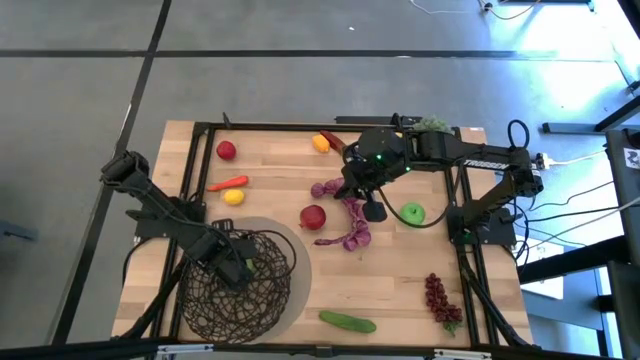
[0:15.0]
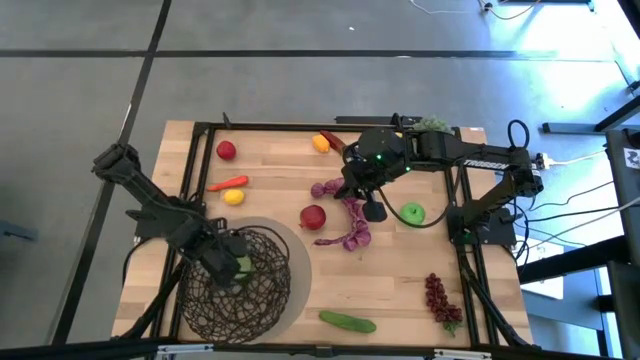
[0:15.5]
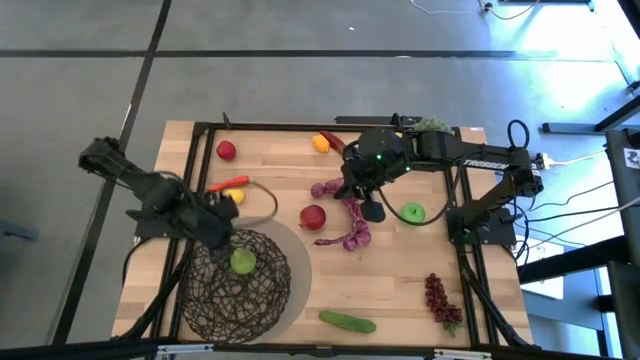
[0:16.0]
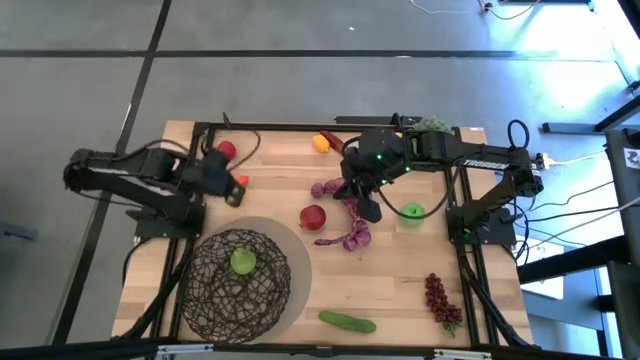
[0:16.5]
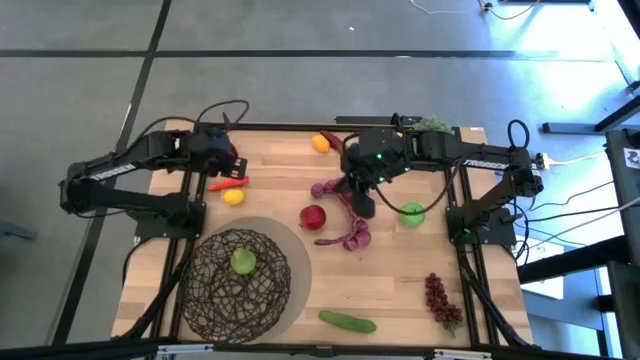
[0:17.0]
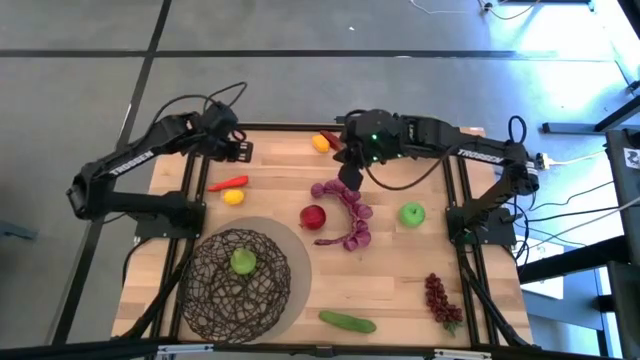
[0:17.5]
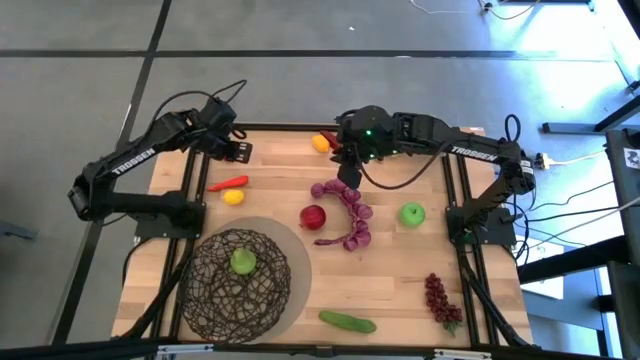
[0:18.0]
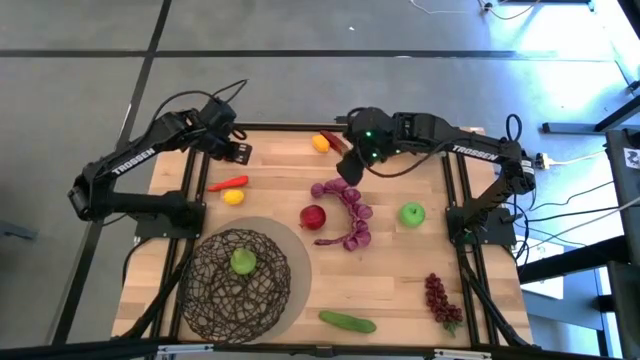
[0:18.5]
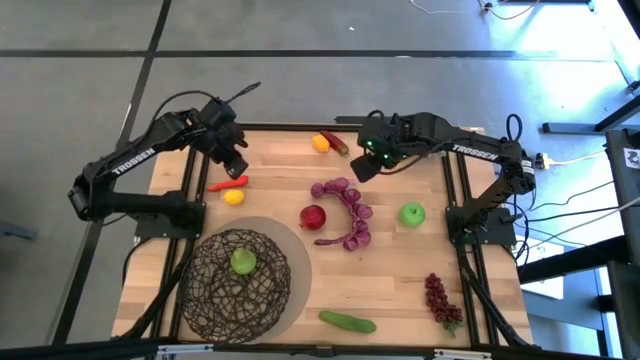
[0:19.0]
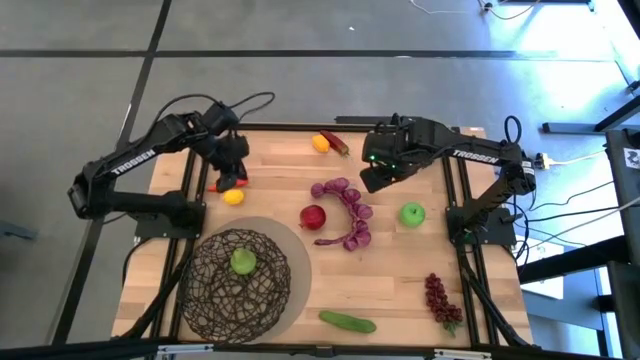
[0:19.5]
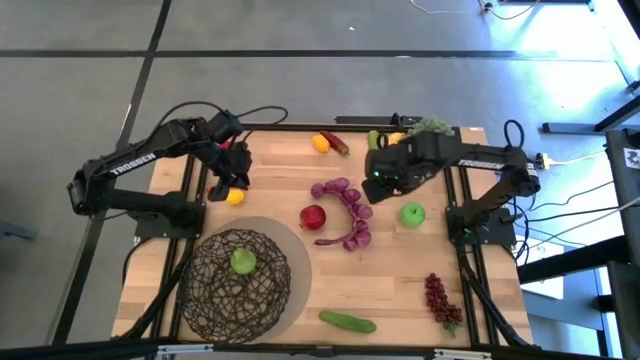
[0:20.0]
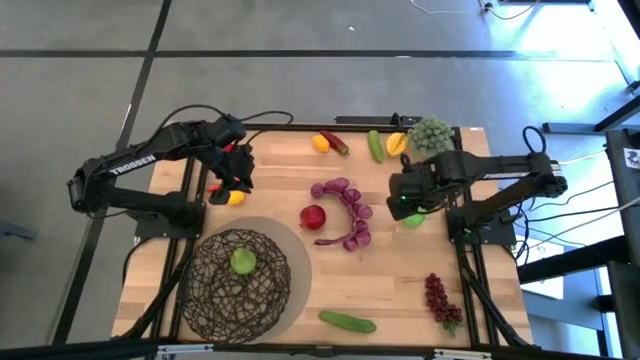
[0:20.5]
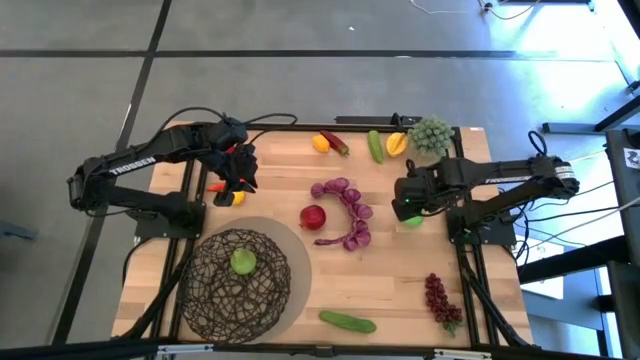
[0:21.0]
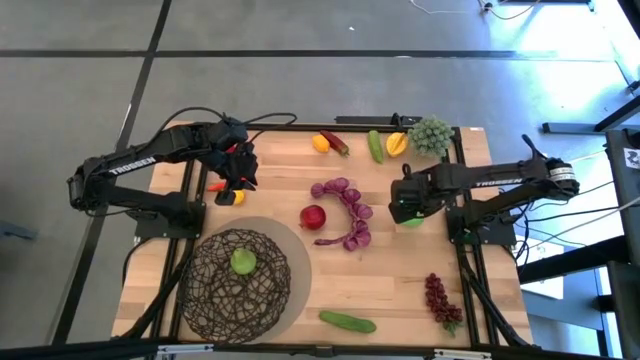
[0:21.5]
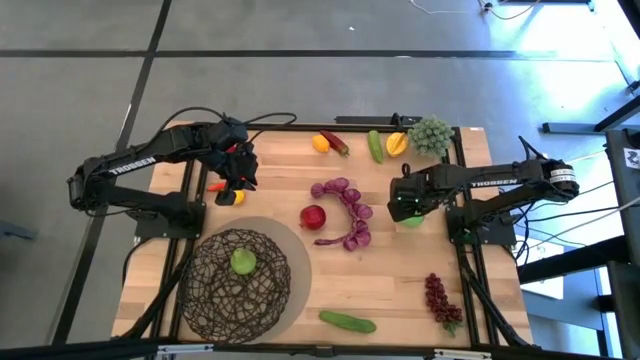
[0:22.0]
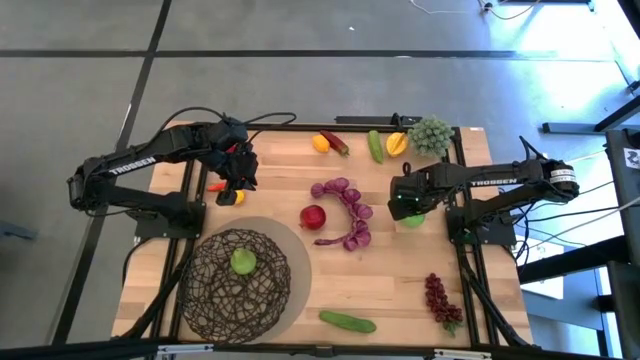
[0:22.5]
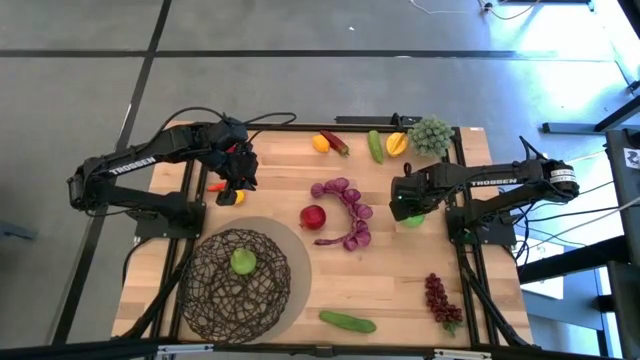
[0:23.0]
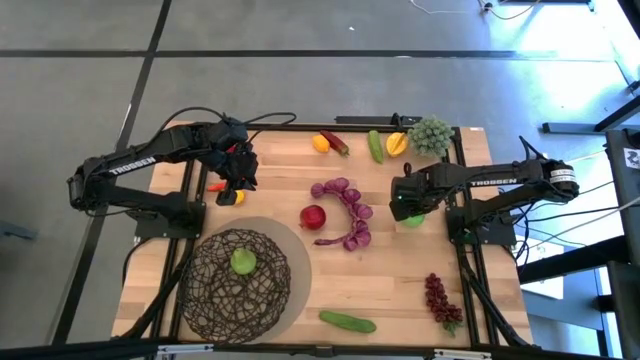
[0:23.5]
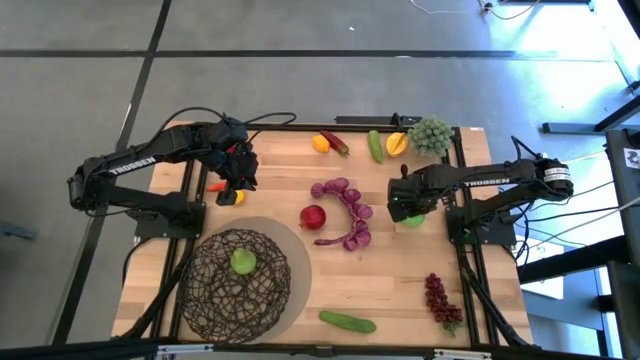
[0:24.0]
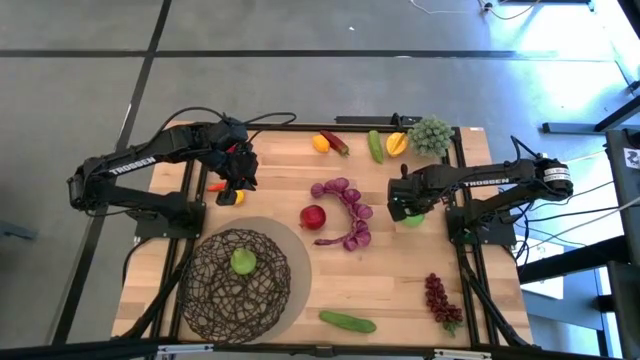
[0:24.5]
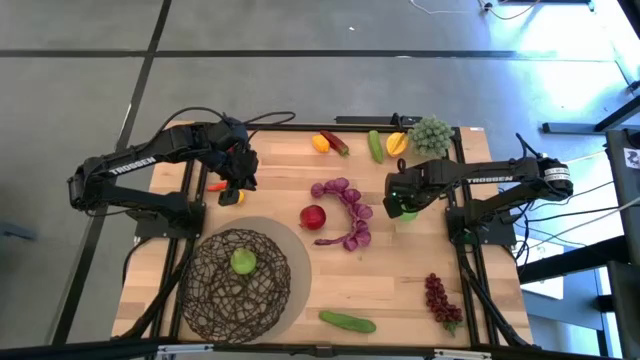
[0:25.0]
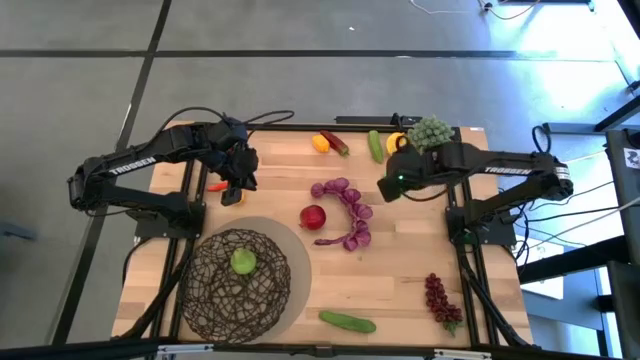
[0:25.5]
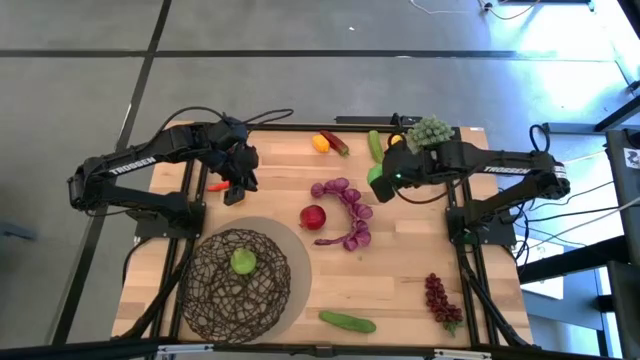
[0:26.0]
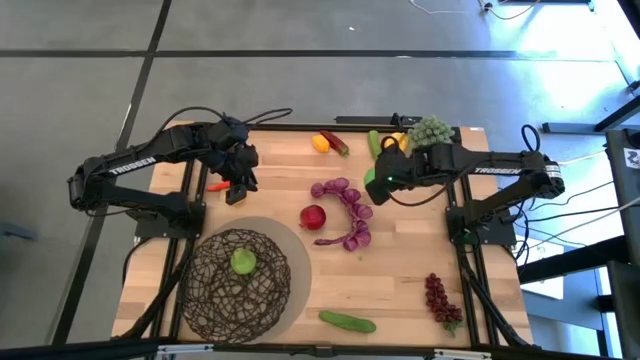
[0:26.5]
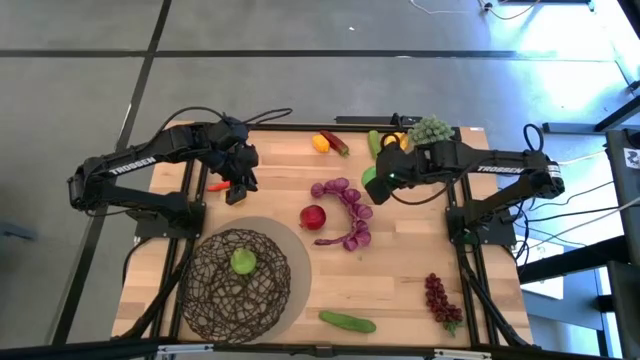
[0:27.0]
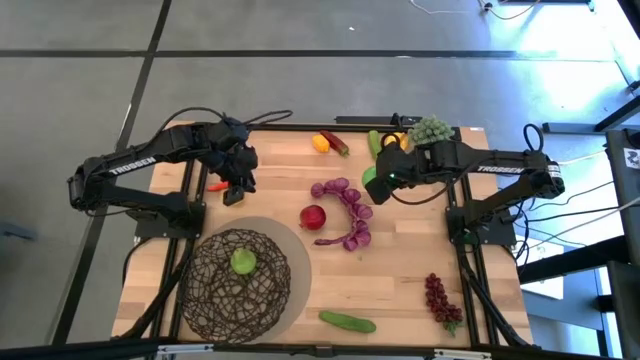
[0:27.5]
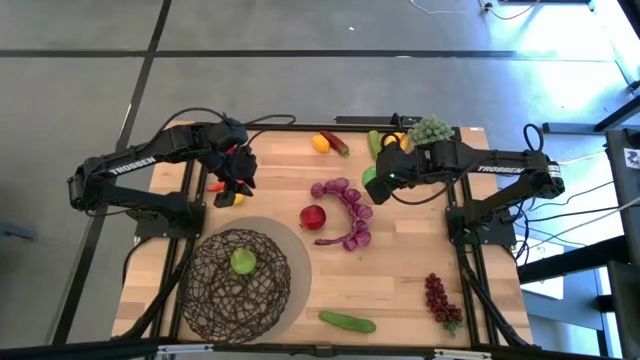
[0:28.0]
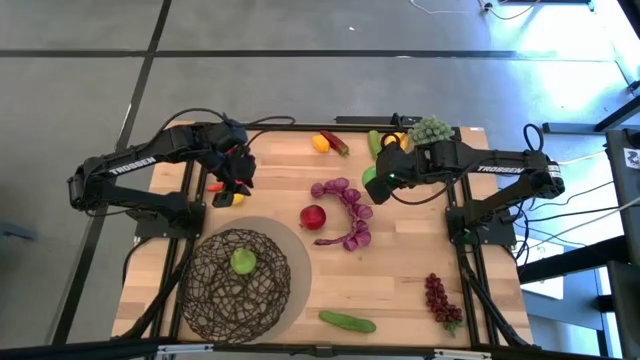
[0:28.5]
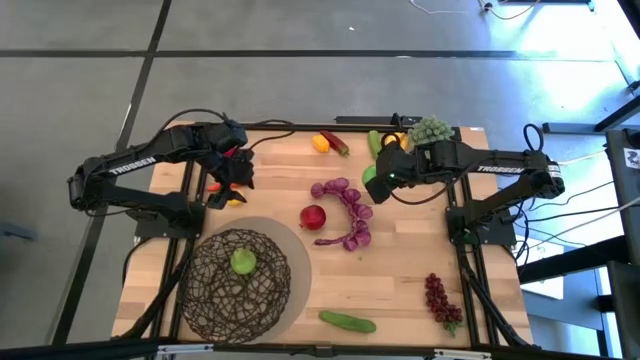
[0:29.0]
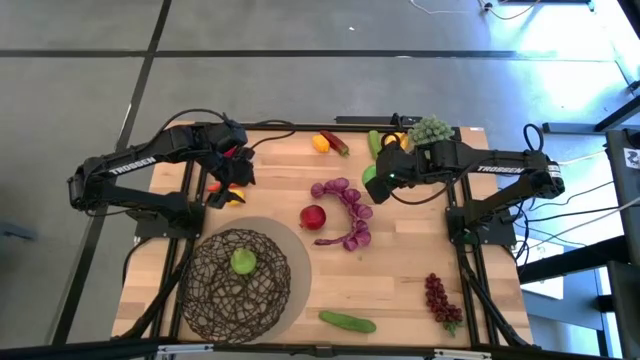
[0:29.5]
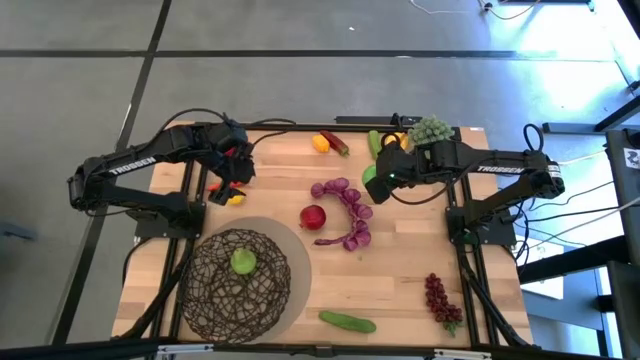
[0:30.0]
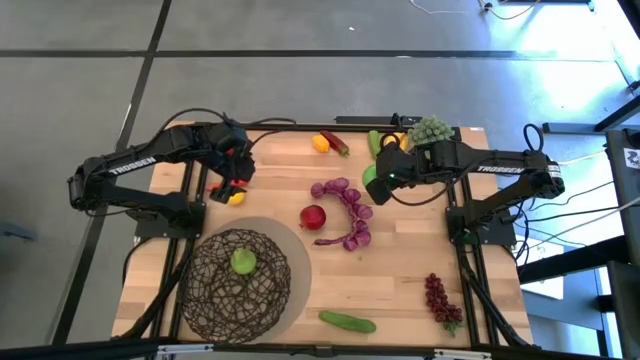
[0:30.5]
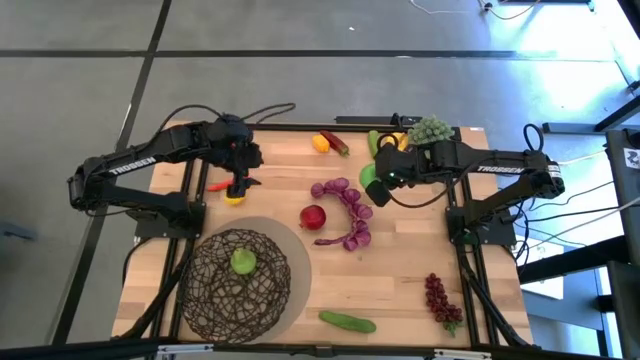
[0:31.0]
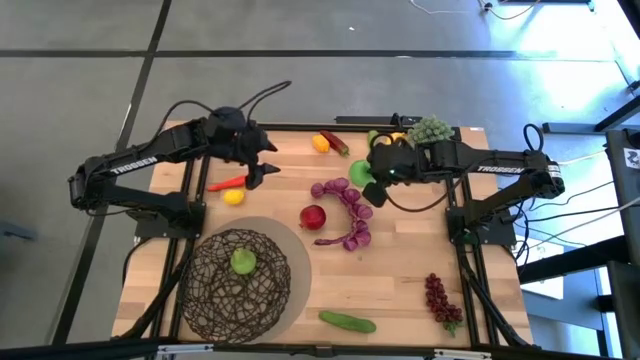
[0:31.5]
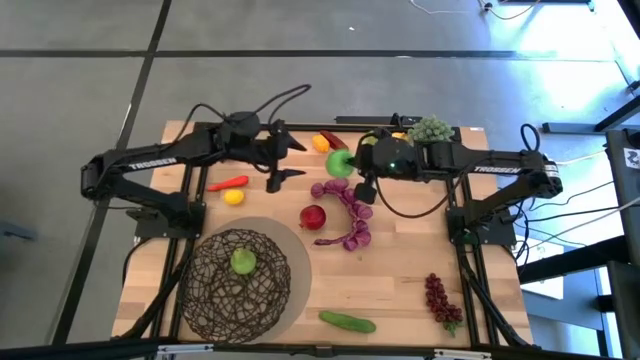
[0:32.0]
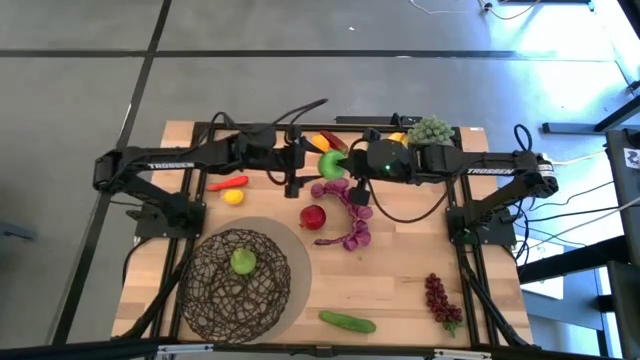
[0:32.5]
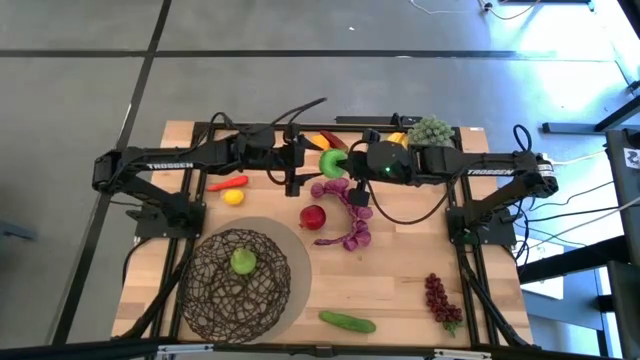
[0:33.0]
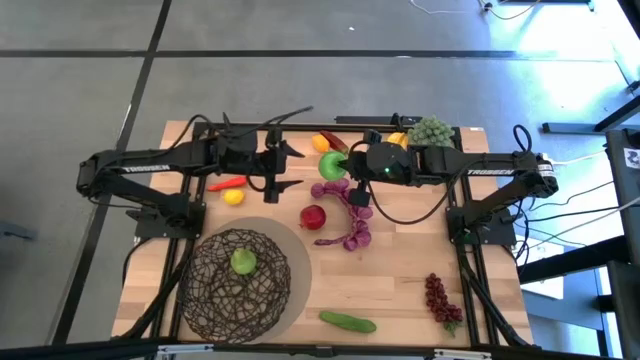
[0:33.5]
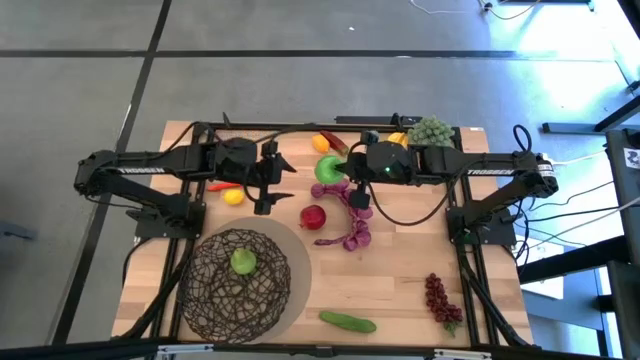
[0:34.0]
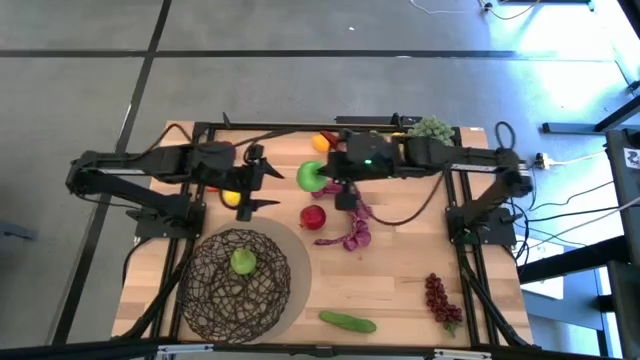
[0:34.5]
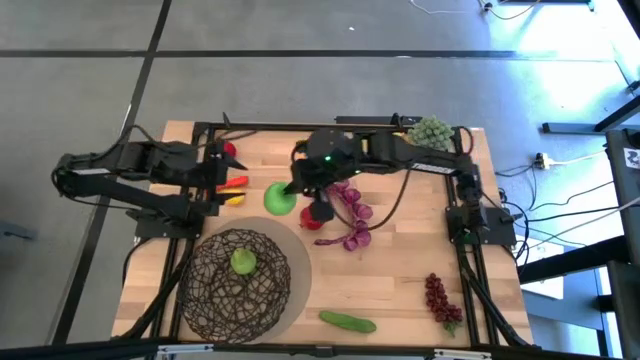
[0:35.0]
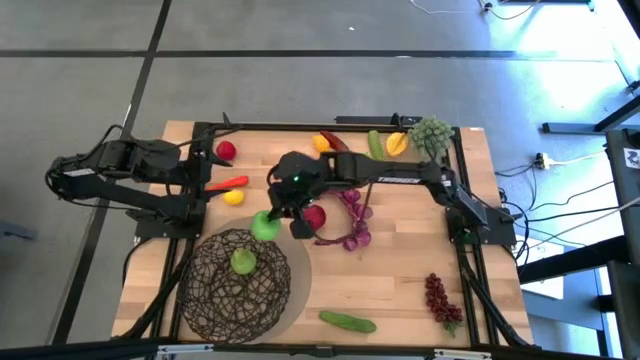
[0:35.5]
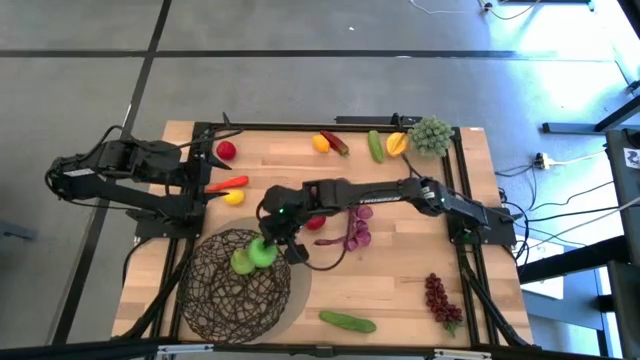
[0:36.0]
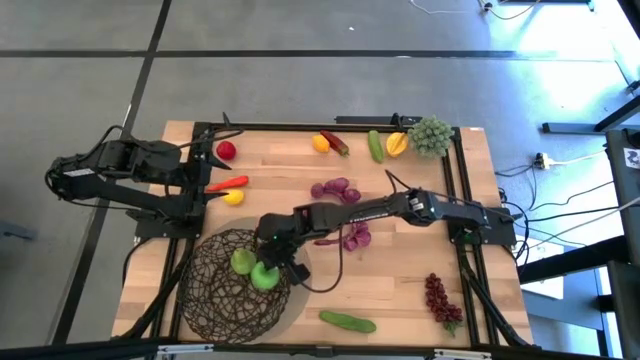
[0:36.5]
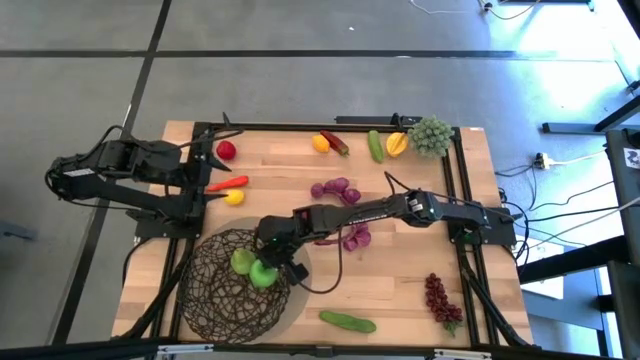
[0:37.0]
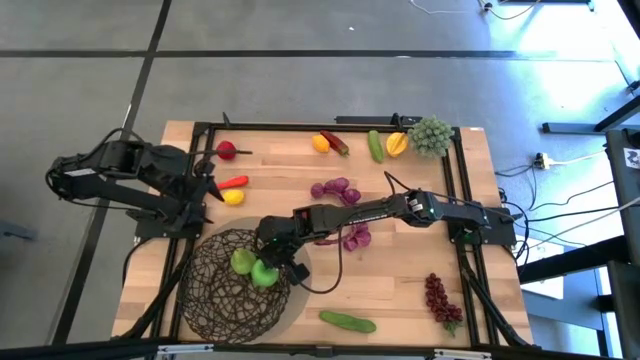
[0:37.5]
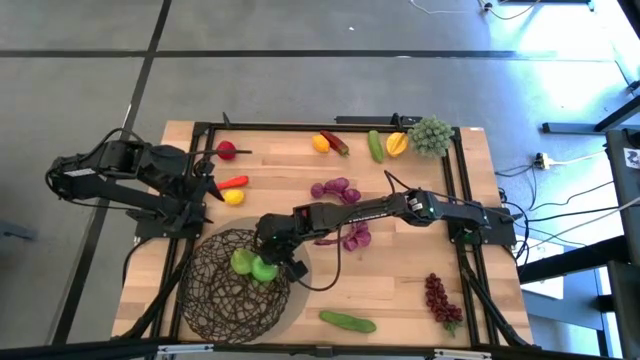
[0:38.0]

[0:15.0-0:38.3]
Task: Build produce basket
Put the green apple into the black wire basket
